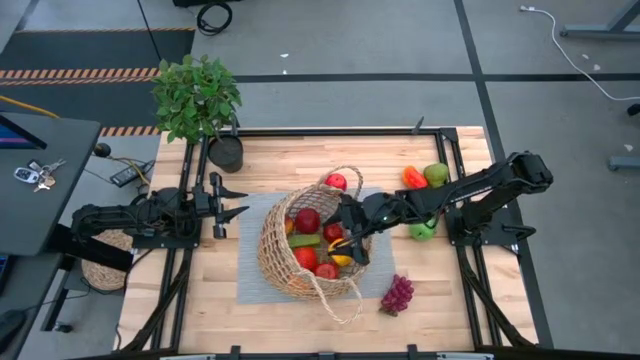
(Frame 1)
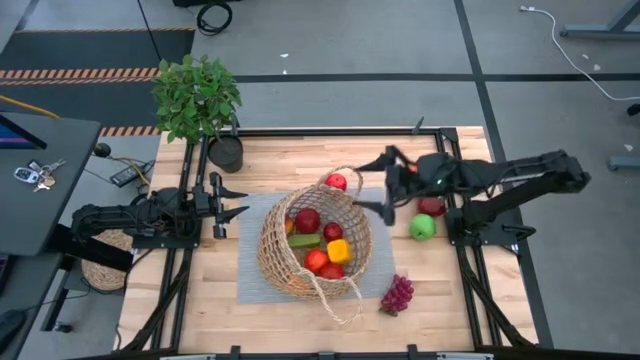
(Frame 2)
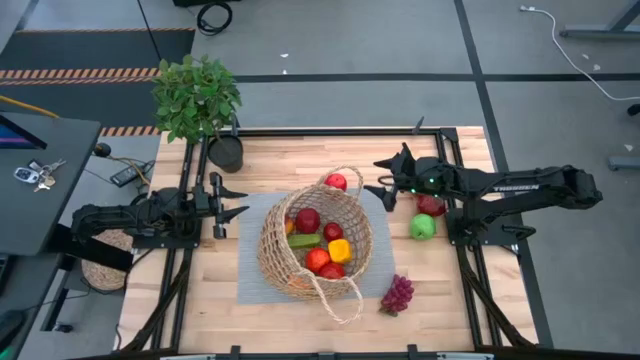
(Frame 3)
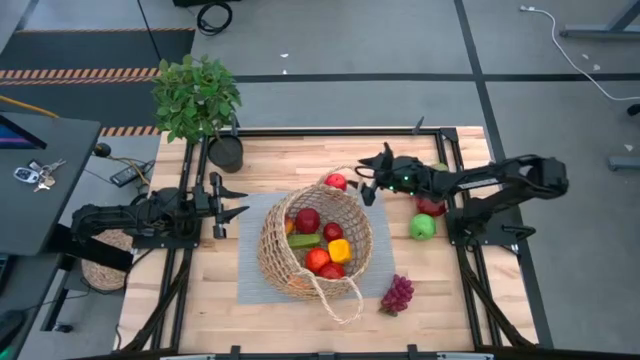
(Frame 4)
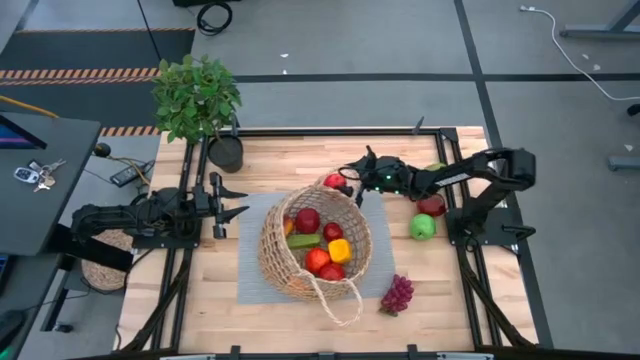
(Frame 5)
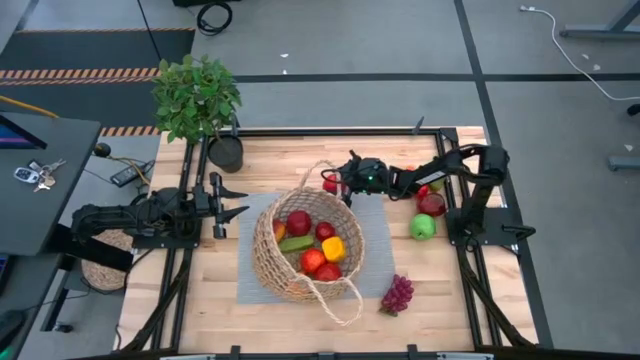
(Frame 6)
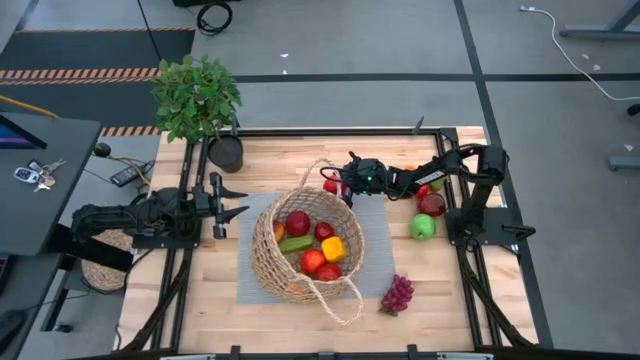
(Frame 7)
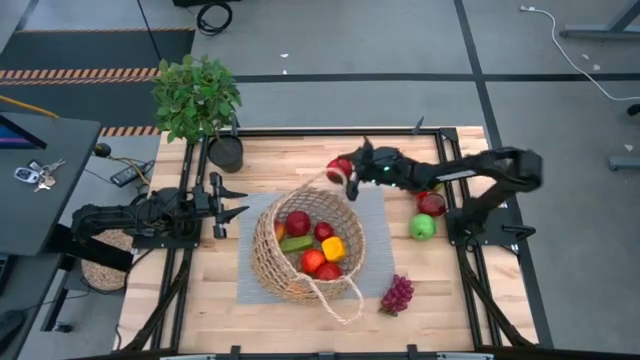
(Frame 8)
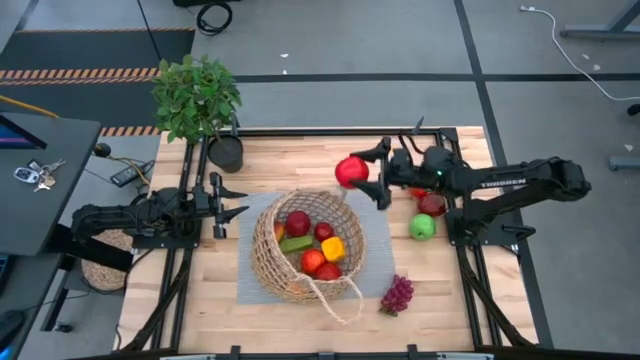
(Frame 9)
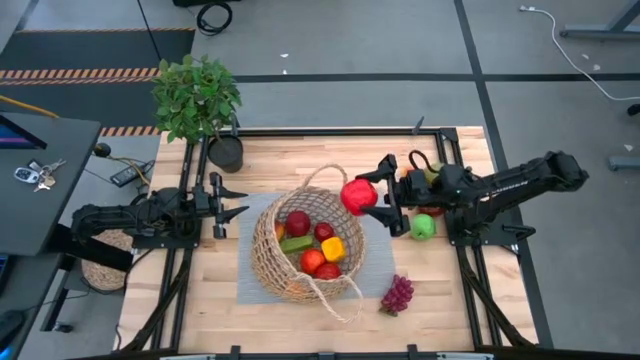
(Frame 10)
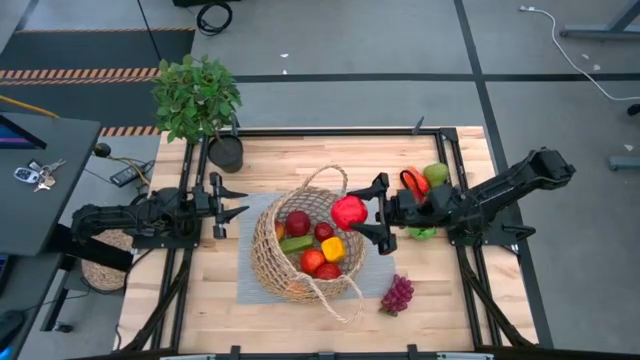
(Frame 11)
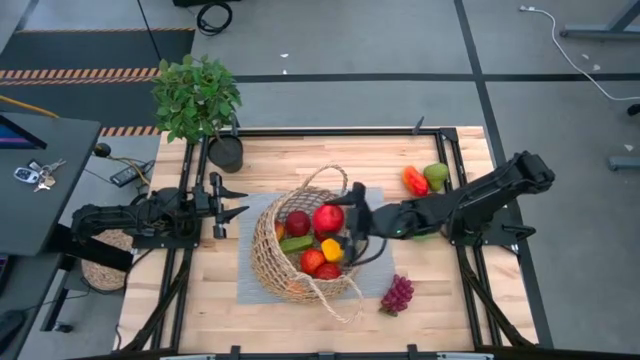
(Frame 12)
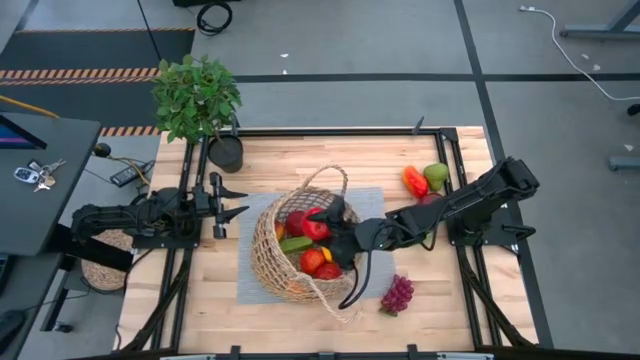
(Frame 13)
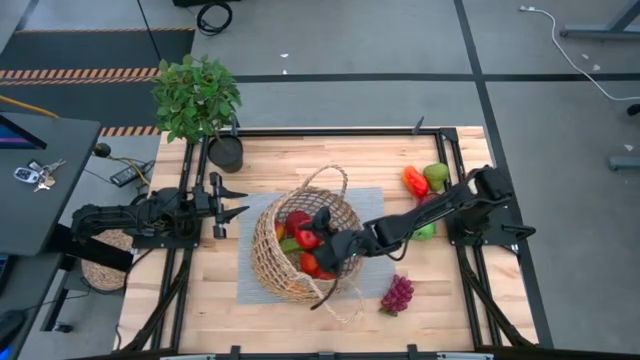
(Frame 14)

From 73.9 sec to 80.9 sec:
Task: Build produce basket
Put the red apple into the brown basket

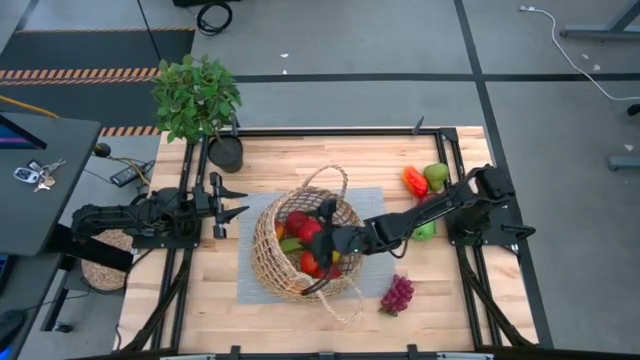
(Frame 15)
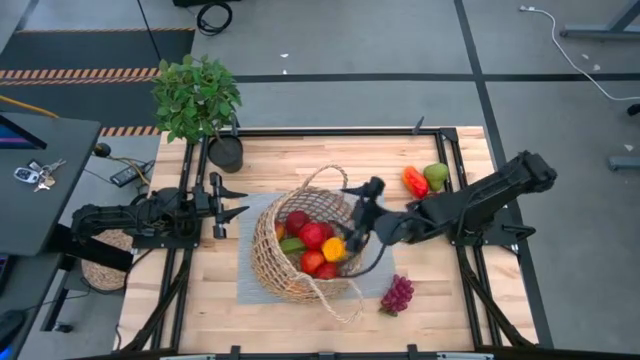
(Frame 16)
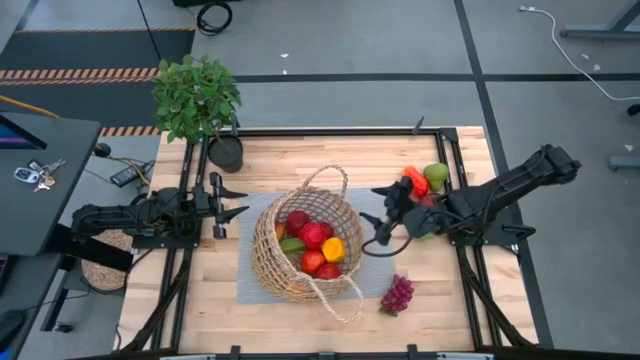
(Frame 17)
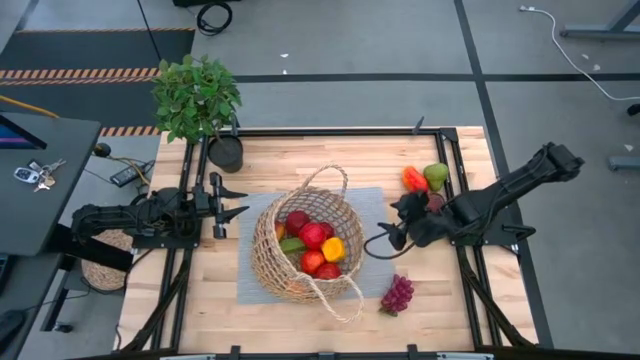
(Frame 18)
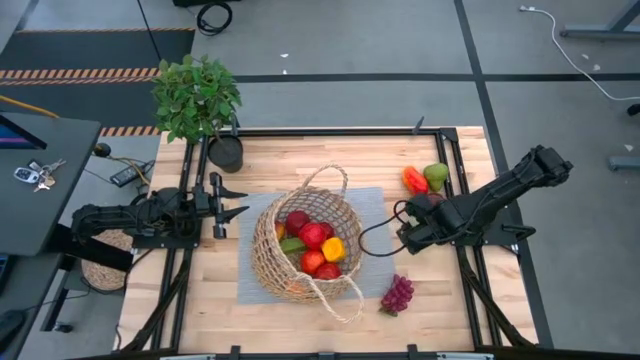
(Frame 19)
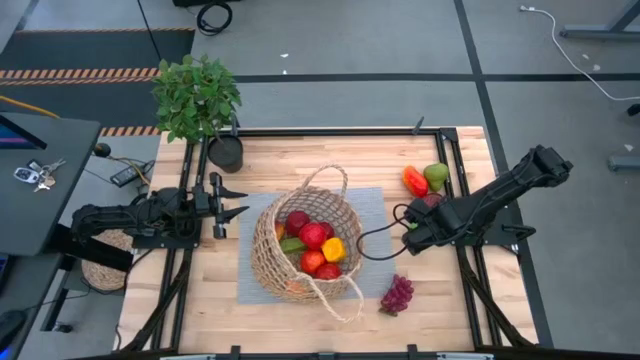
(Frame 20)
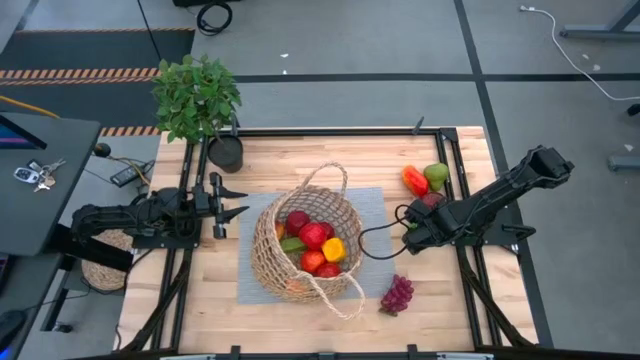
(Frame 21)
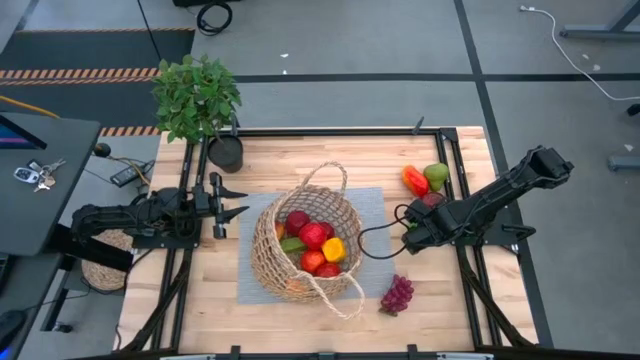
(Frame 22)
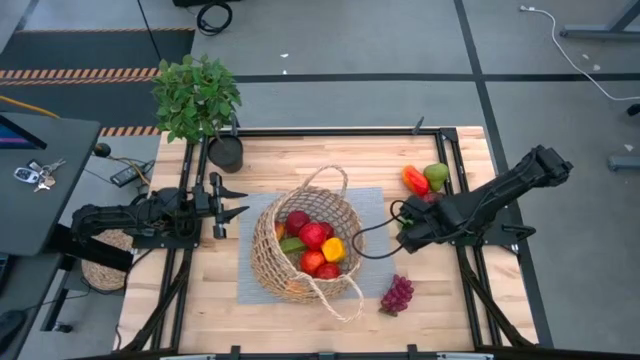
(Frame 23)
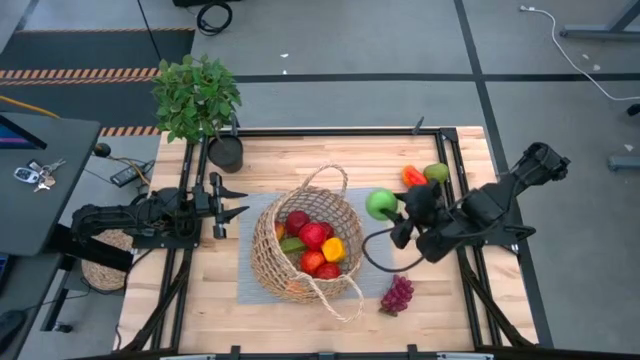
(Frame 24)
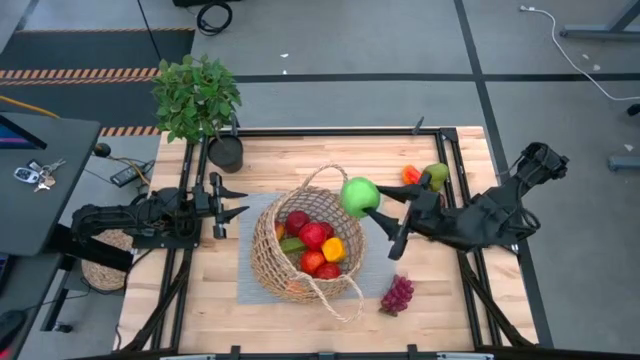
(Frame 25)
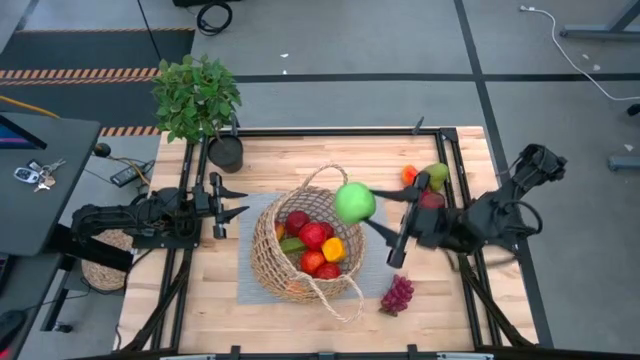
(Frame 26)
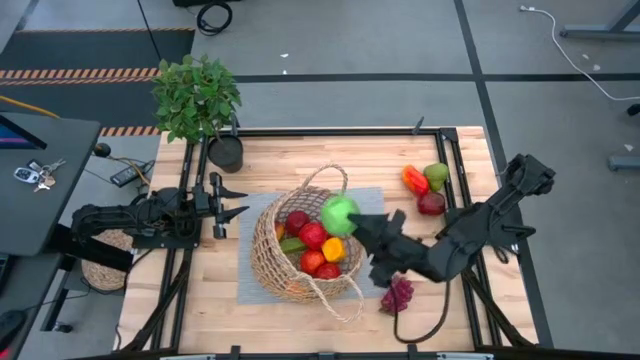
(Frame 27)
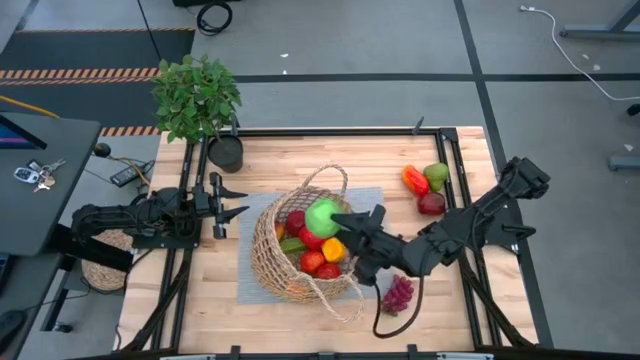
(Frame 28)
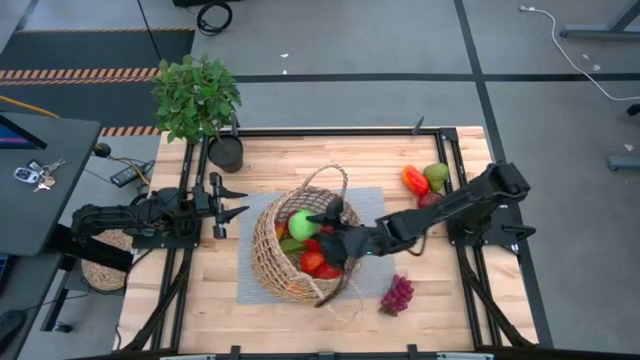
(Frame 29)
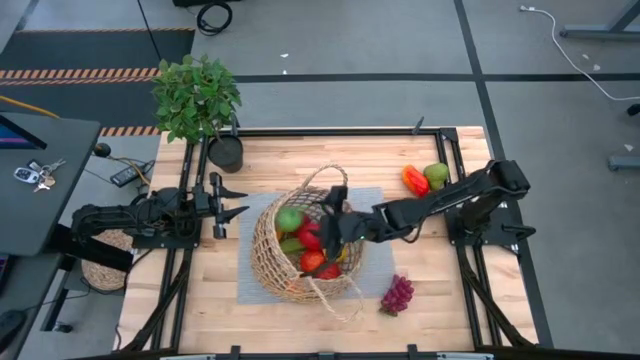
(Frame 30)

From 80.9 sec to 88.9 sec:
Put the green apple into the brown basket

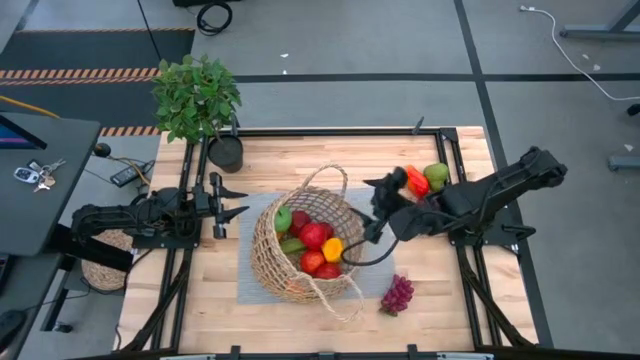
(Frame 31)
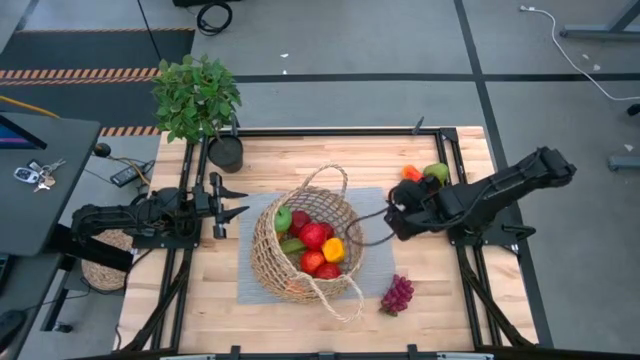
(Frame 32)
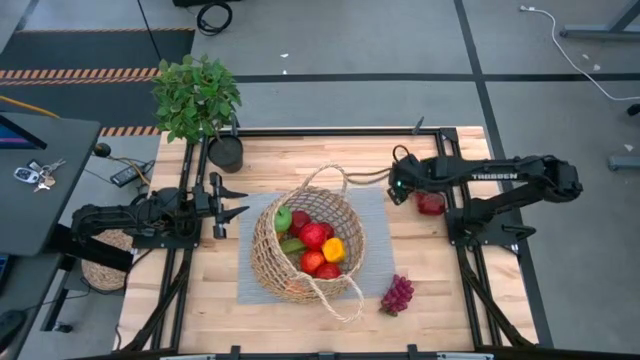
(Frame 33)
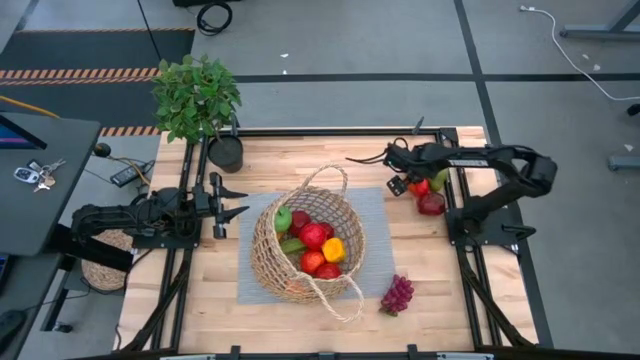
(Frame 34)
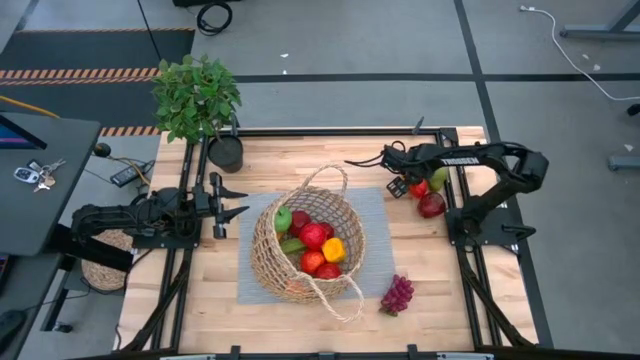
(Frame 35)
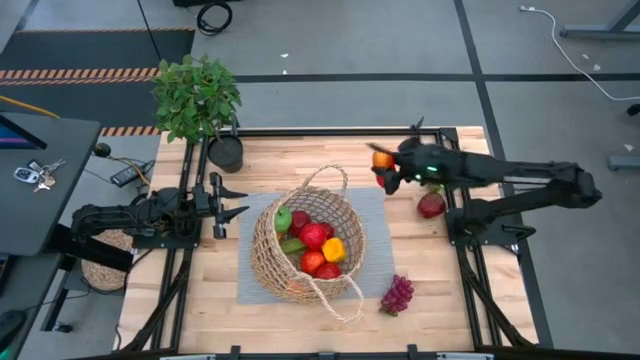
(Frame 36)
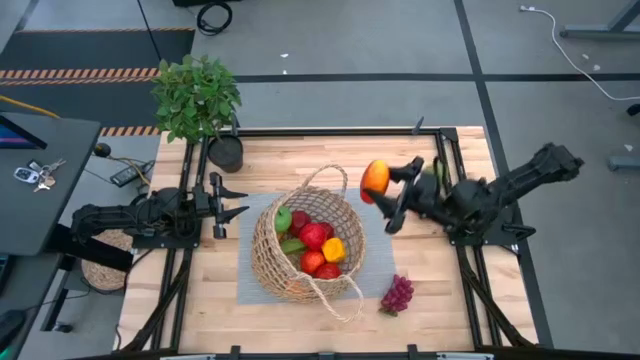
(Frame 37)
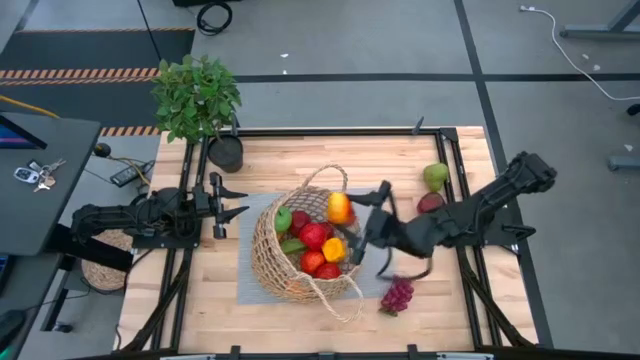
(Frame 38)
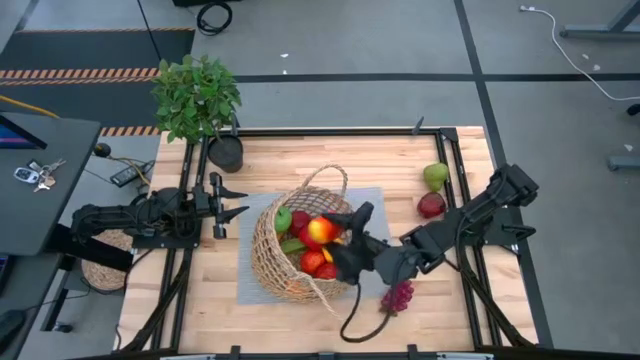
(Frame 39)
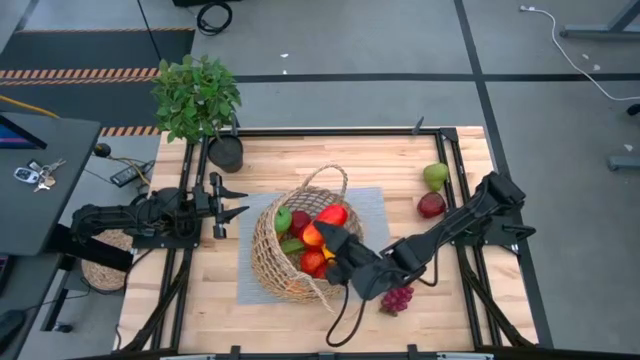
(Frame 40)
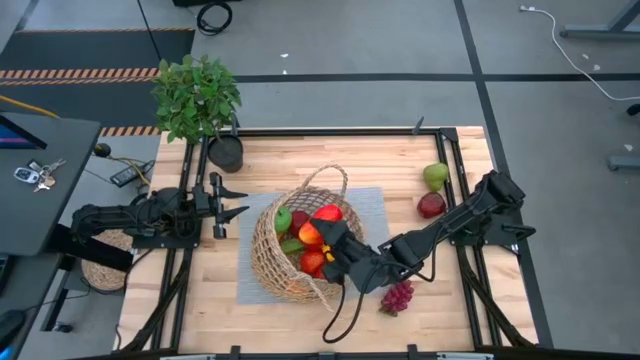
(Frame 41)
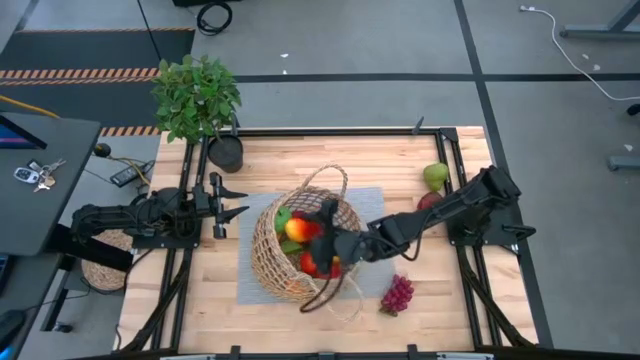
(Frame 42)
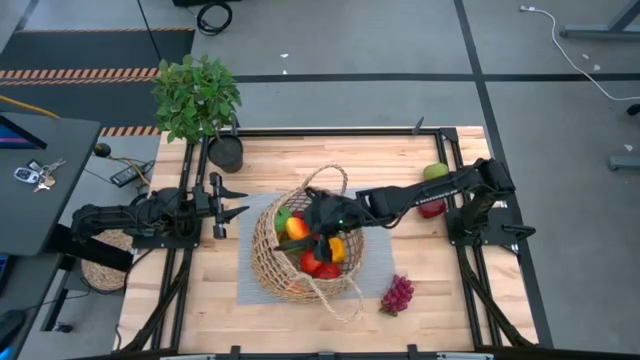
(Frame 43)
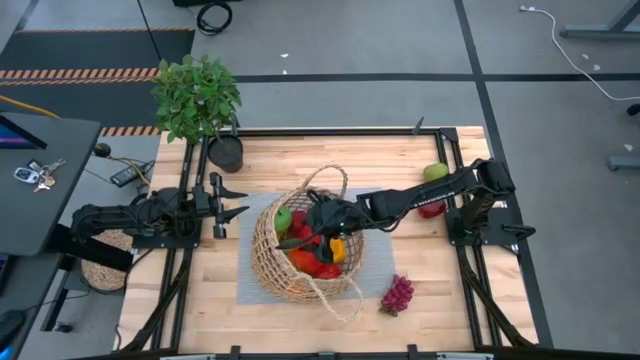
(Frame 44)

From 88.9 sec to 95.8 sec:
Put the mango into the brown basket
